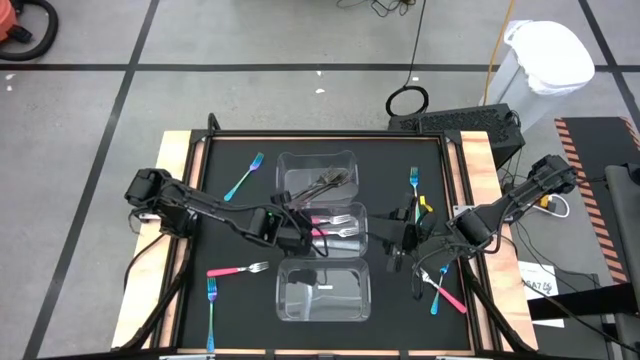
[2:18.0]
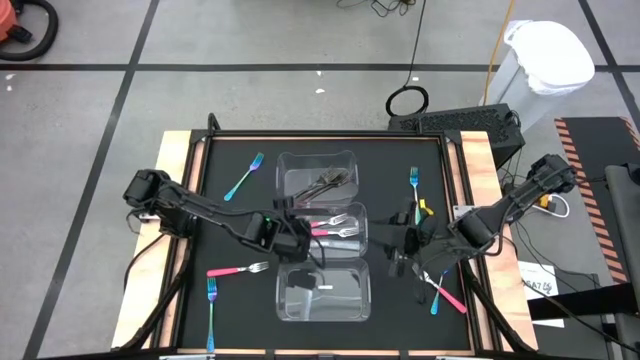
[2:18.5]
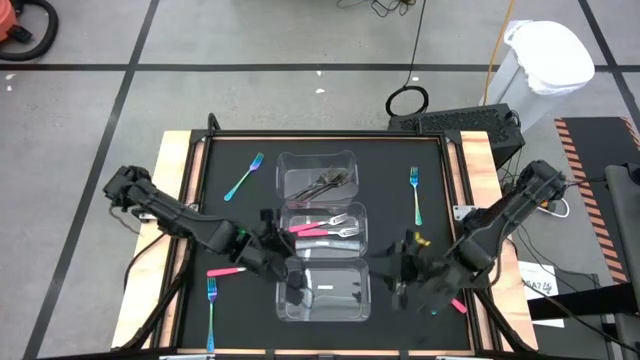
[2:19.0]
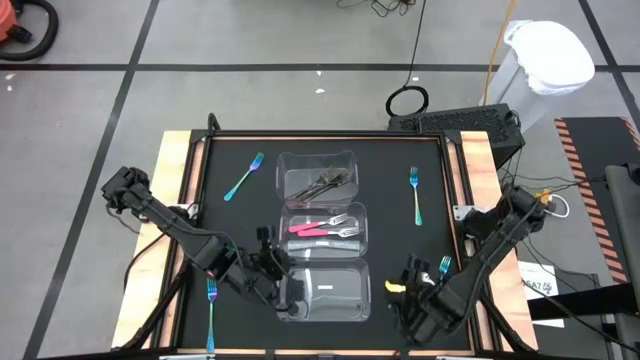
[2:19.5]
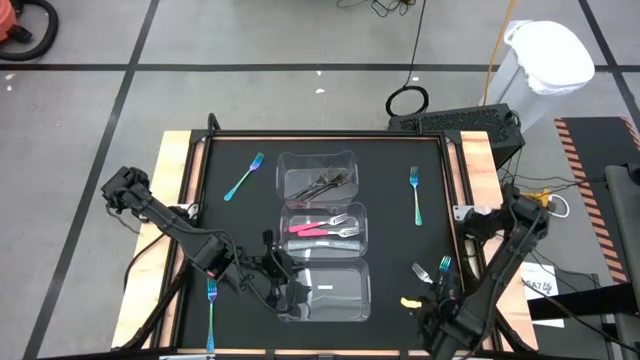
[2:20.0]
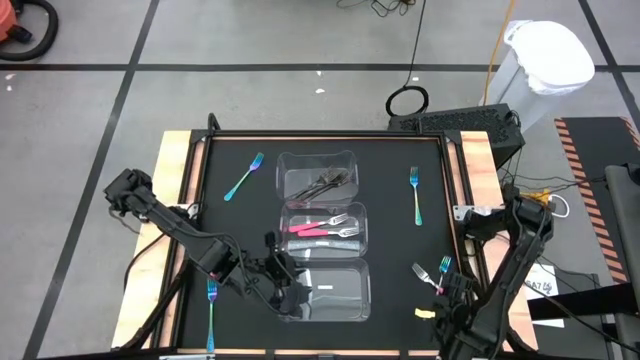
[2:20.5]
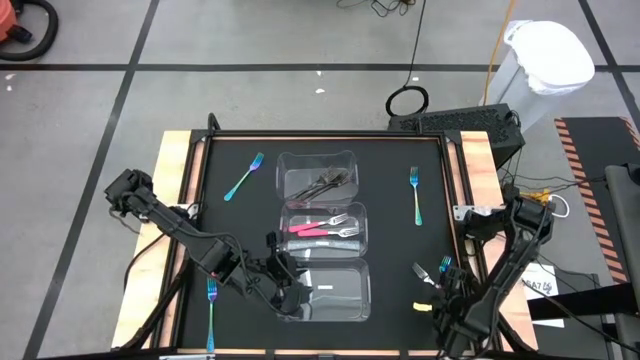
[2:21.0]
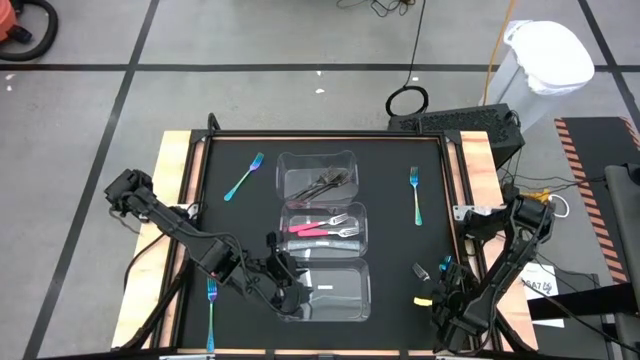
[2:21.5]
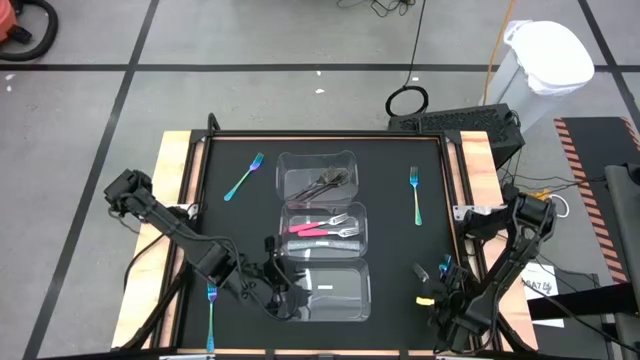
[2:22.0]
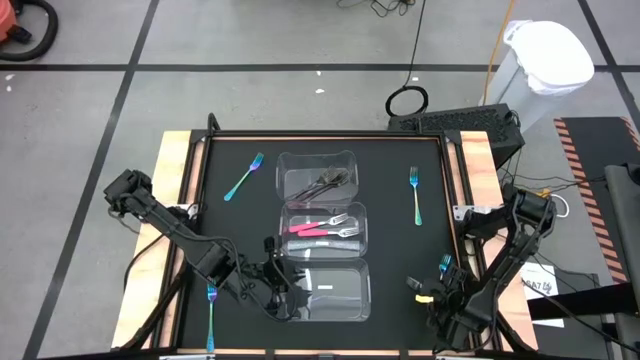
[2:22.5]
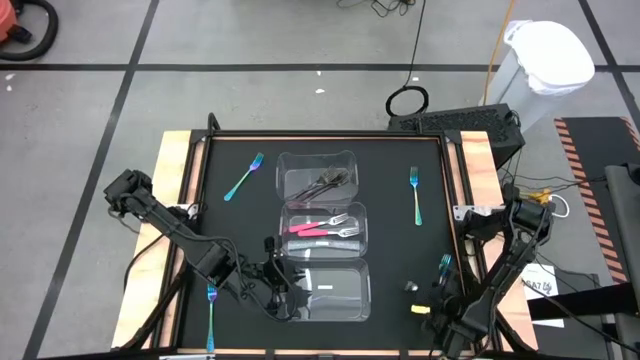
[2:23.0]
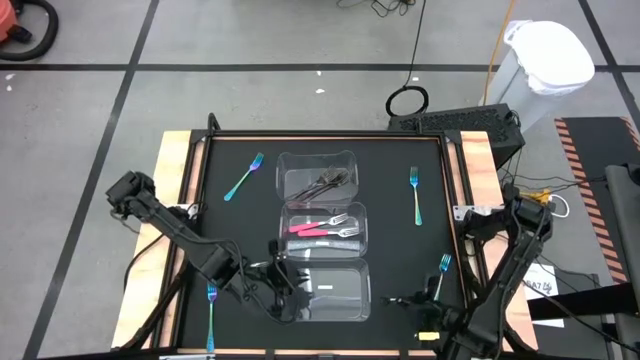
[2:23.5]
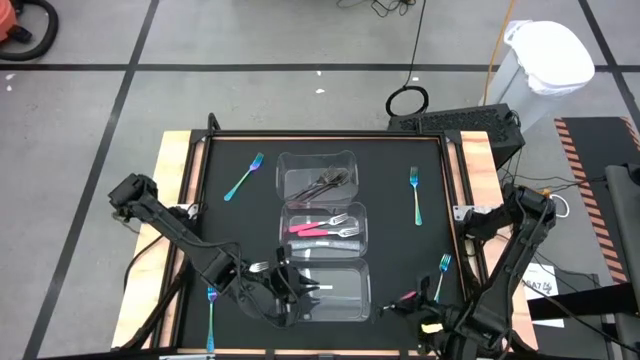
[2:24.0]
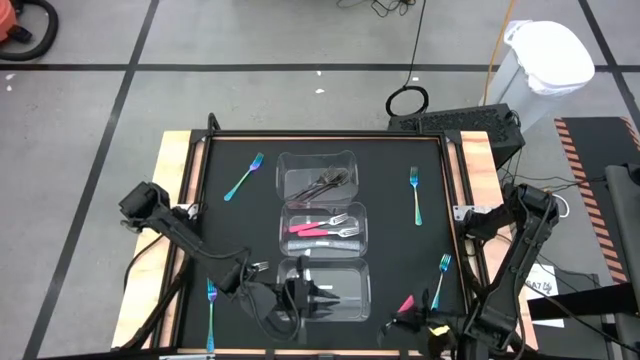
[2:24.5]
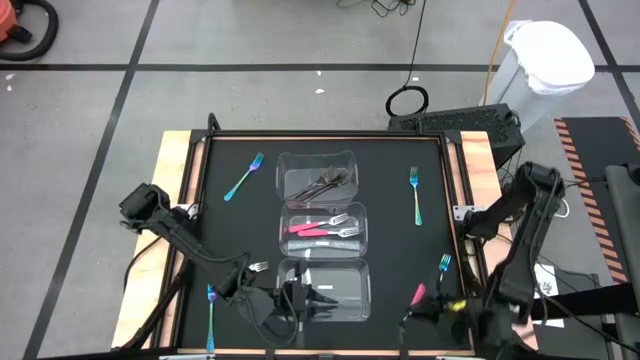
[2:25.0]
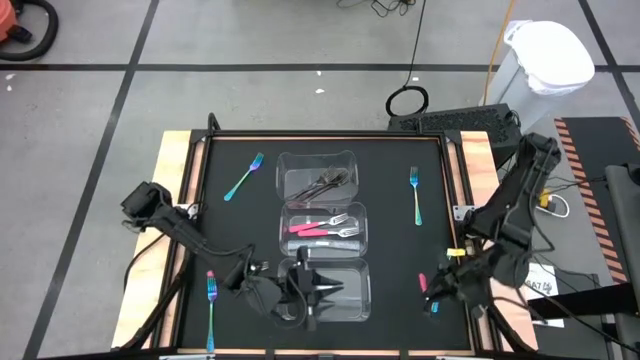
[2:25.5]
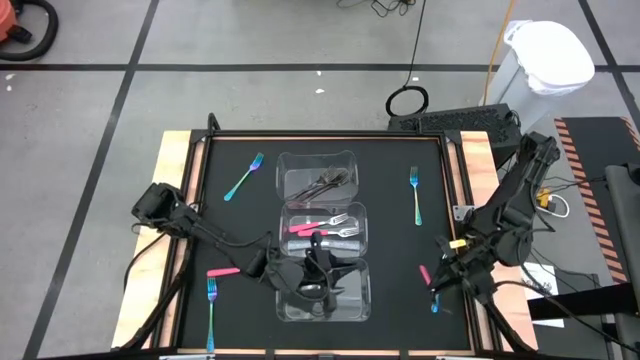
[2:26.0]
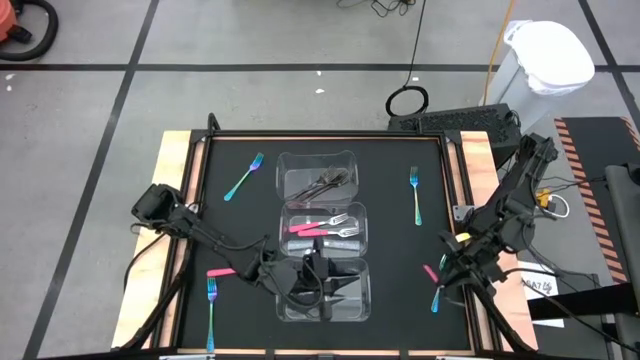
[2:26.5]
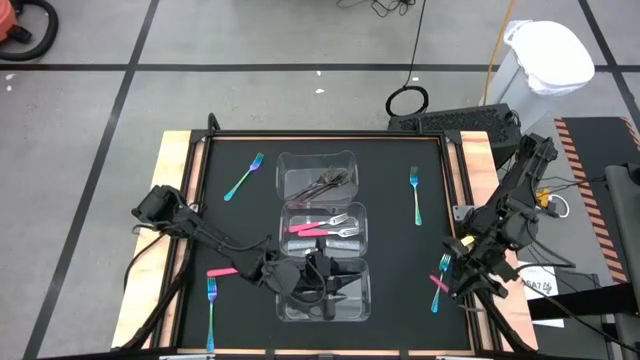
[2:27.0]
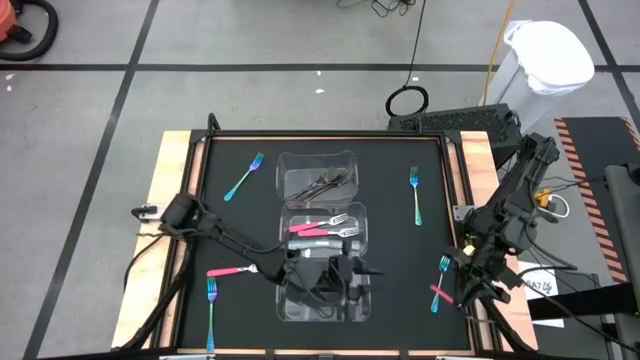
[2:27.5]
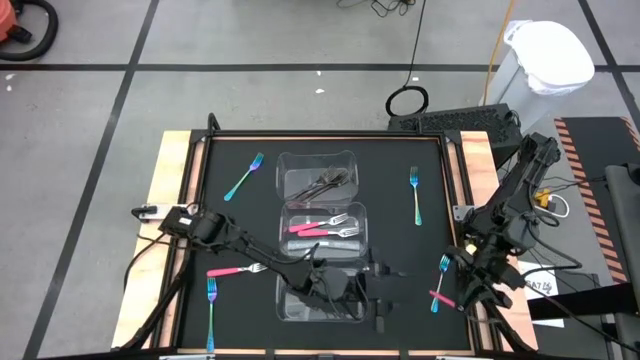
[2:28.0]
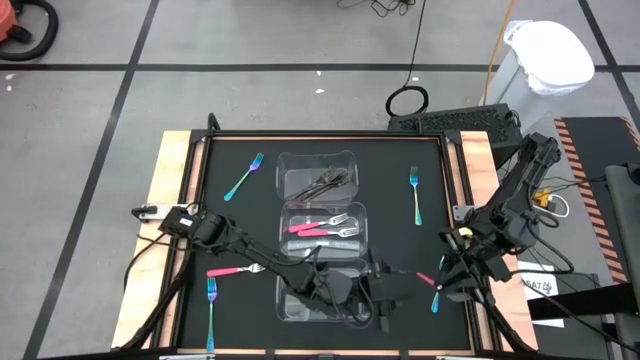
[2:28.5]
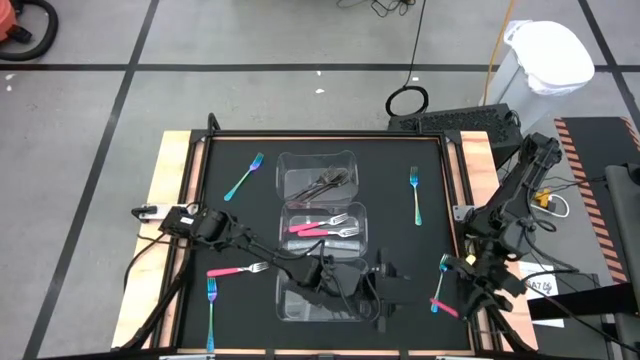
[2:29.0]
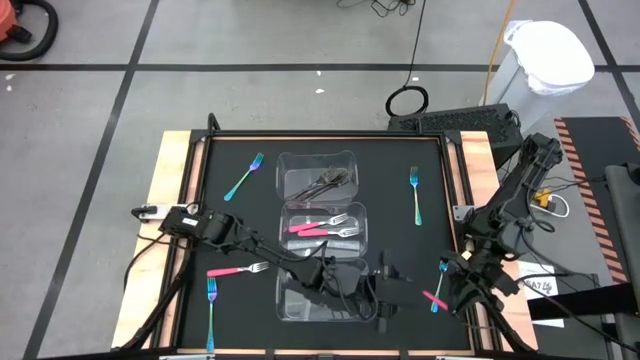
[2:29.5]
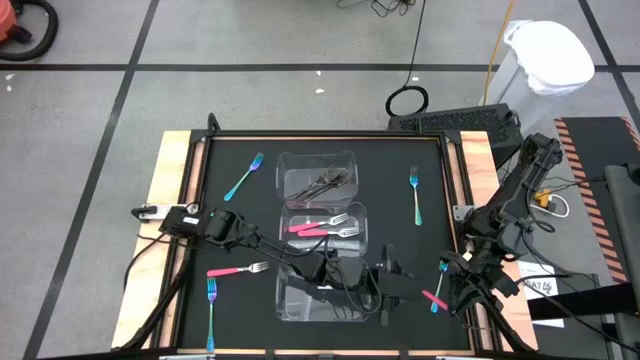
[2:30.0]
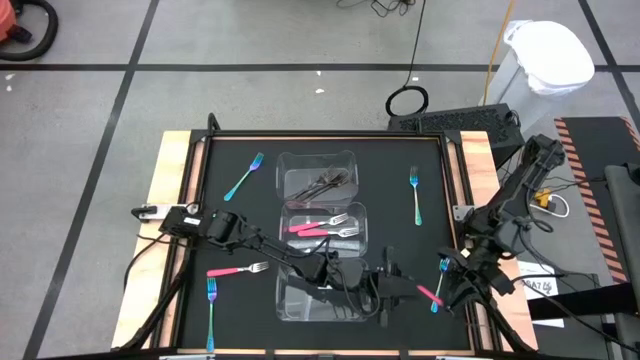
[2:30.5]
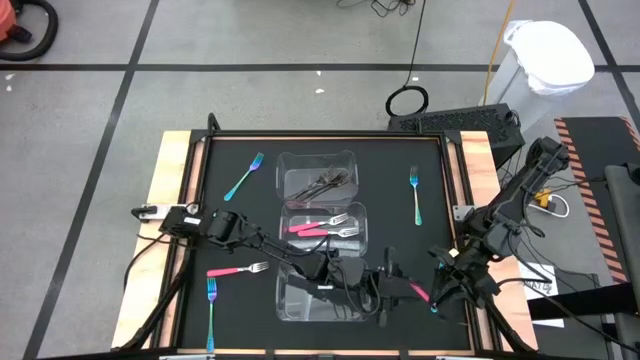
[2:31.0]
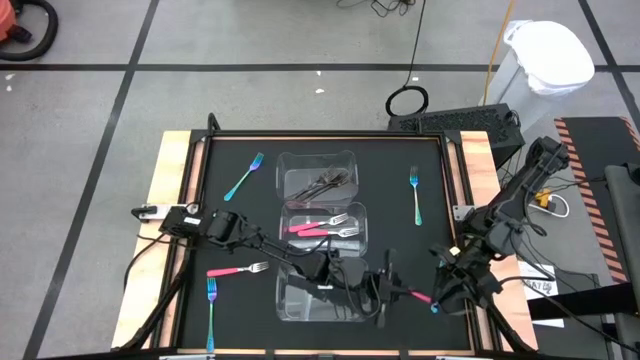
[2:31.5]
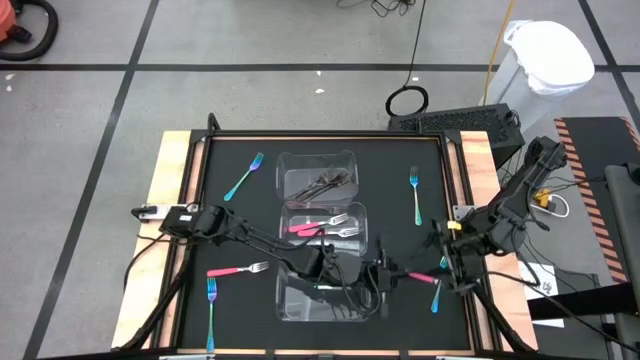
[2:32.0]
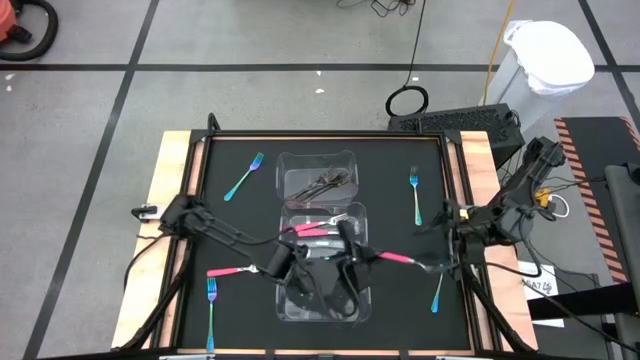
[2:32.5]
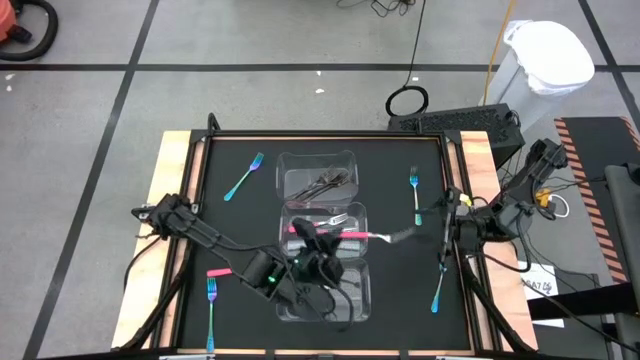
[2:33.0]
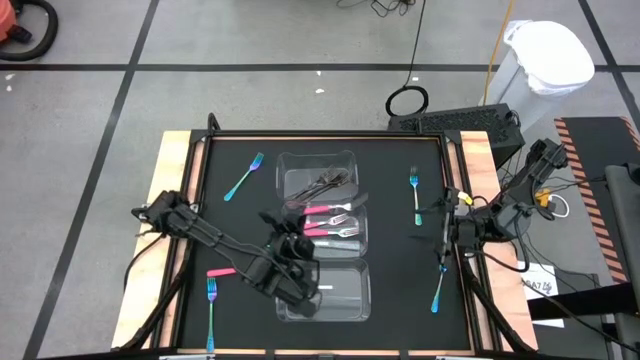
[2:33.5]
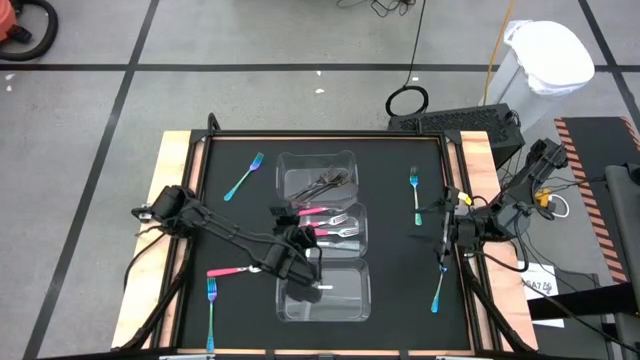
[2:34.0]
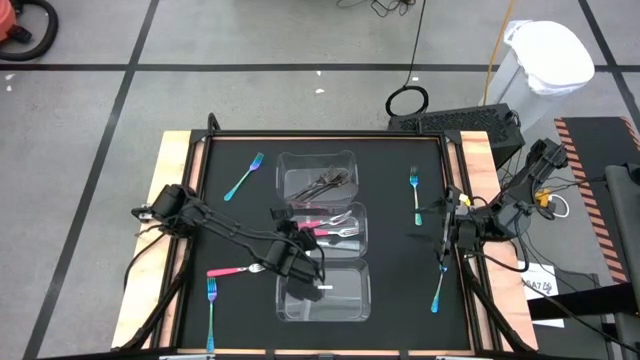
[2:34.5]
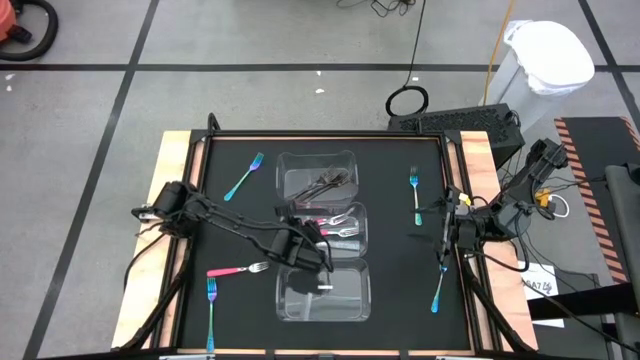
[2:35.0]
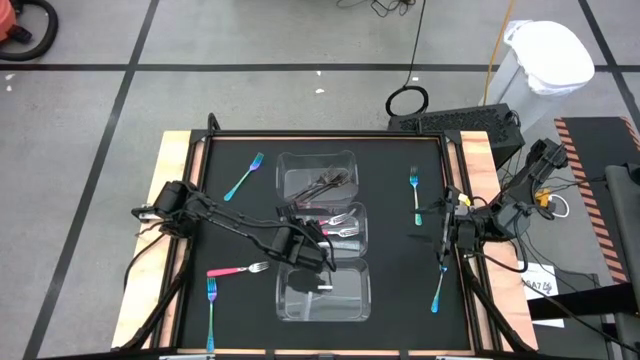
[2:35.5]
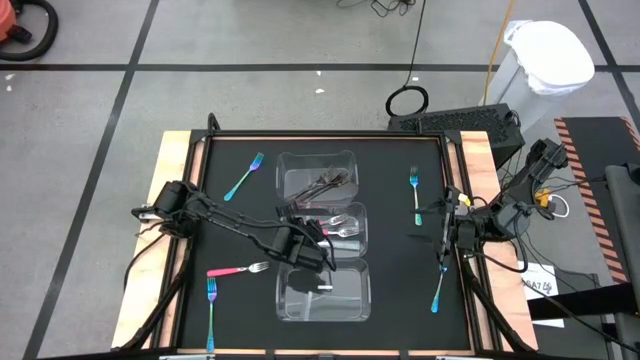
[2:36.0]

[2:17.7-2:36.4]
Task: Sort silverware by color (type)
Put the right pink fork into the middle transparent bin

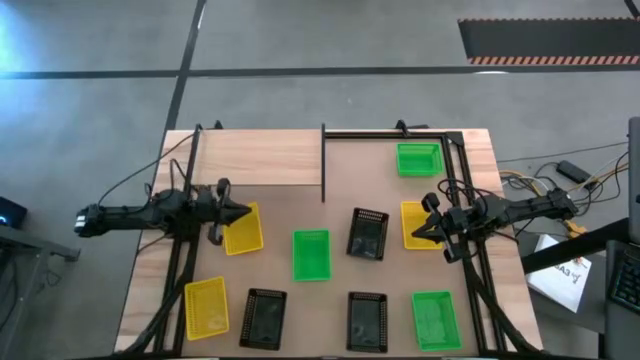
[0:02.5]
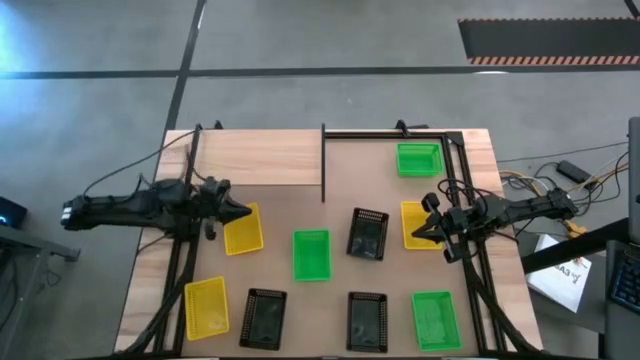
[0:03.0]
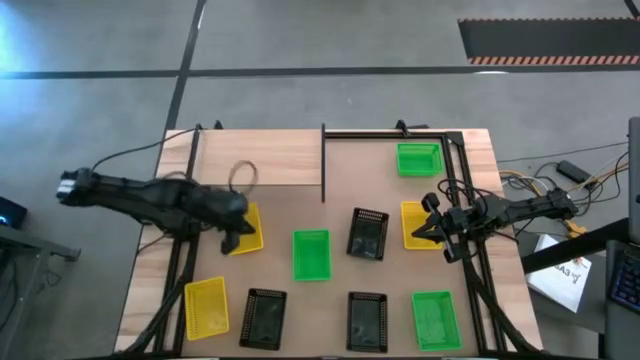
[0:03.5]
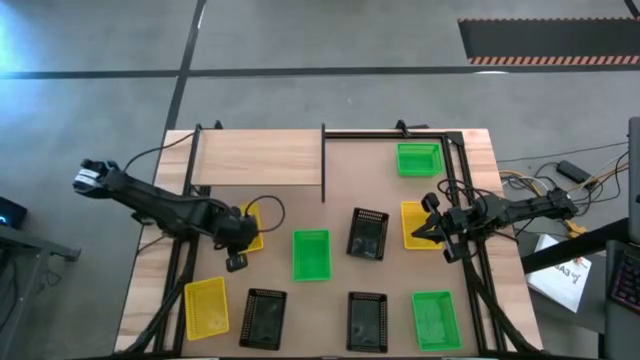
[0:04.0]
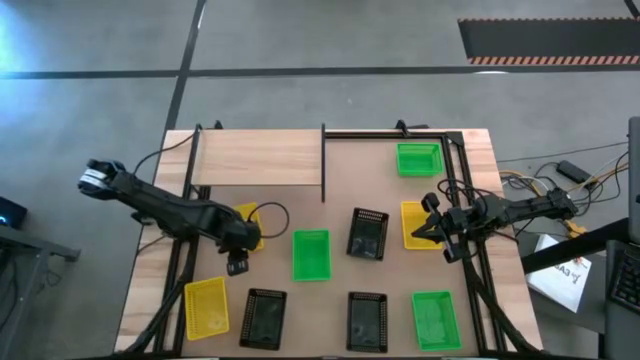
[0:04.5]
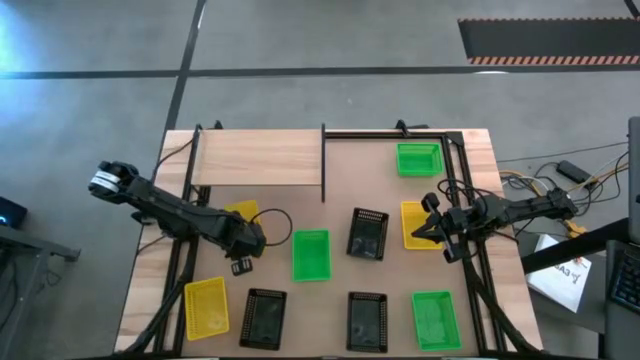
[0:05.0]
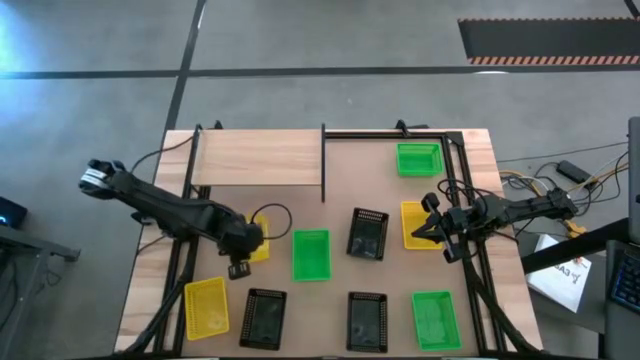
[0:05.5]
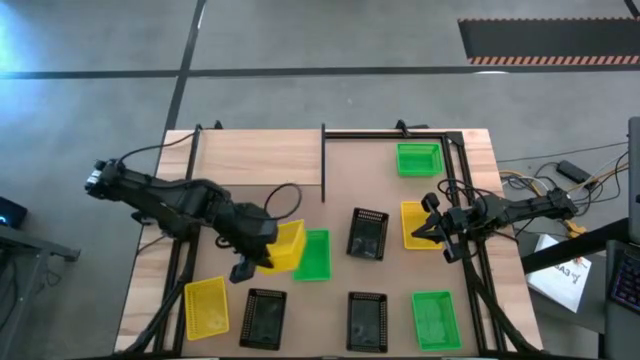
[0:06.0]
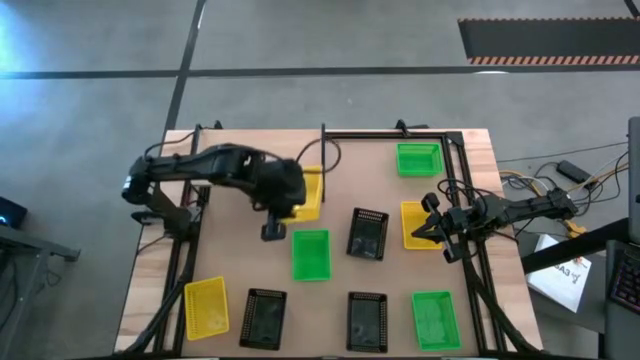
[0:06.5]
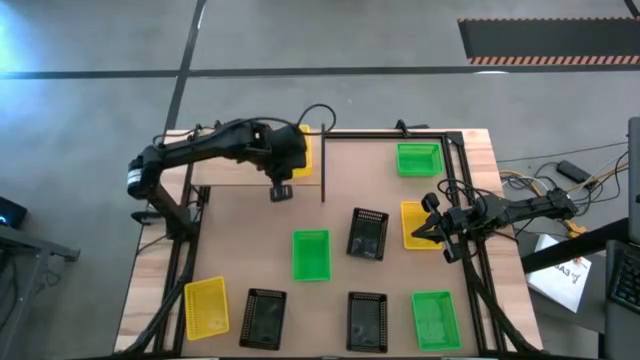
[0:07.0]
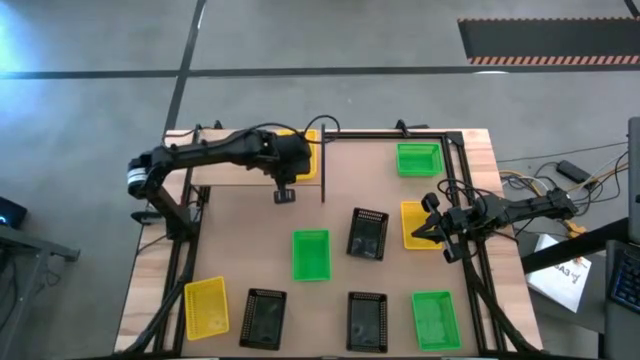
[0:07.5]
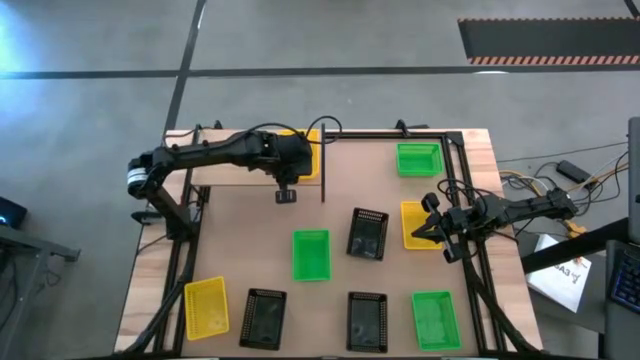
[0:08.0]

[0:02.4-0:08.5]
Task: Stack baskets on shelf by color
Put the top left yellow bin on the shelf
